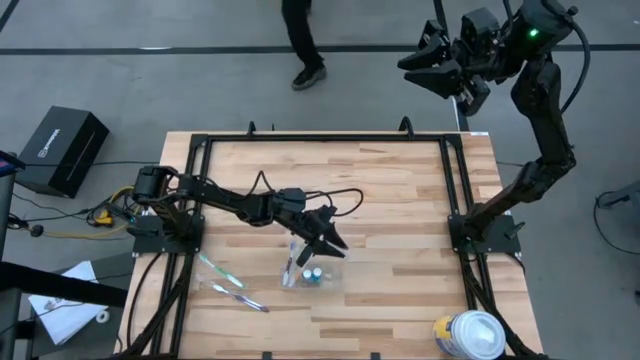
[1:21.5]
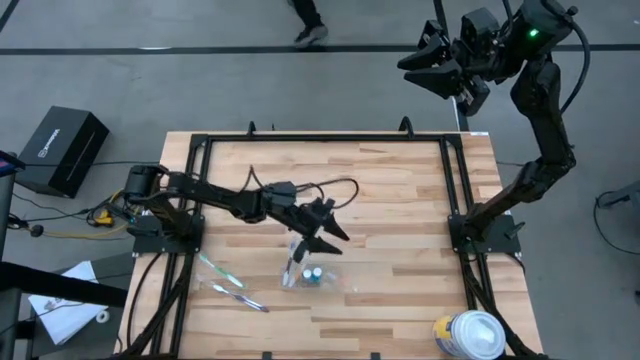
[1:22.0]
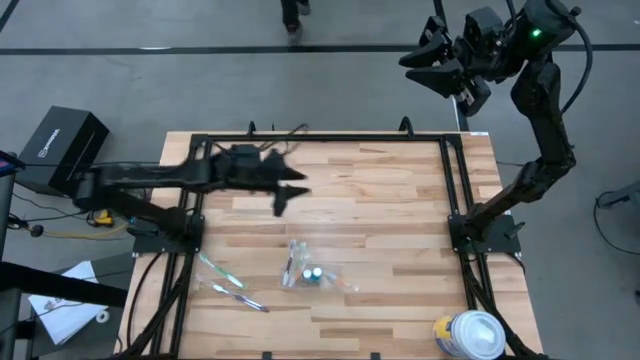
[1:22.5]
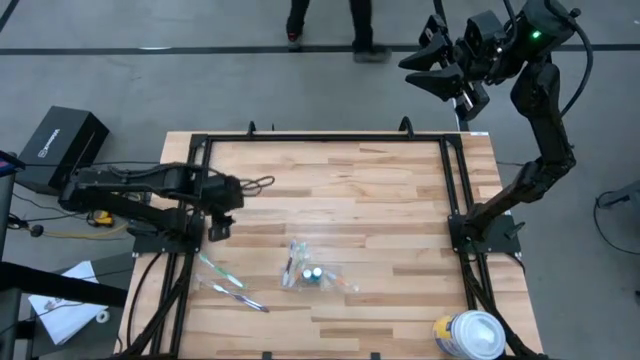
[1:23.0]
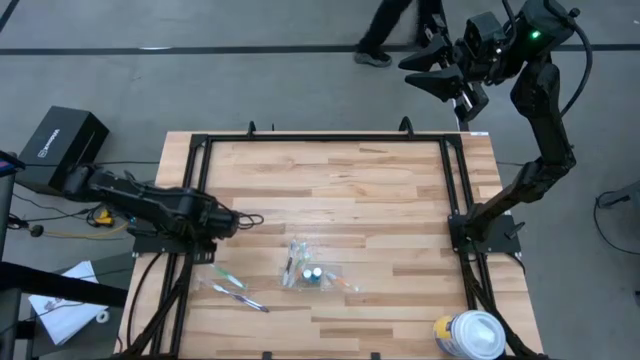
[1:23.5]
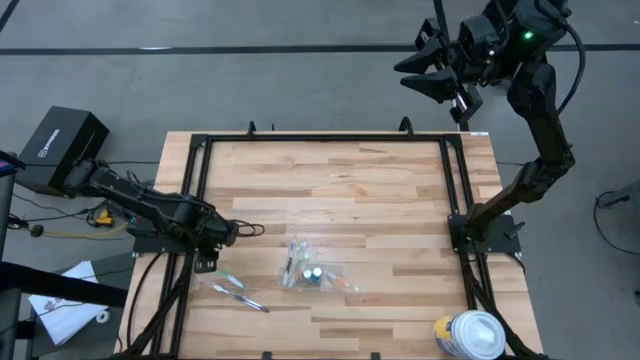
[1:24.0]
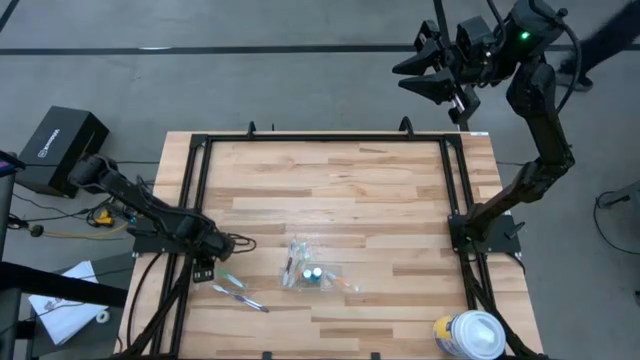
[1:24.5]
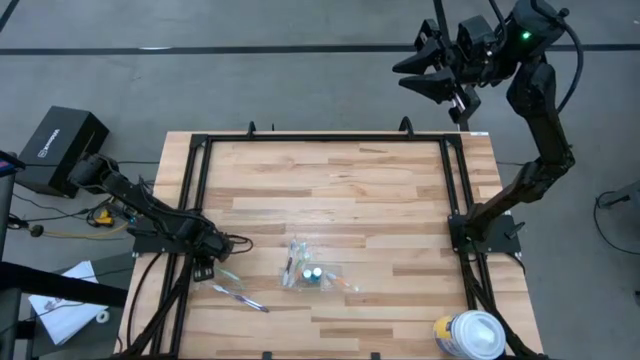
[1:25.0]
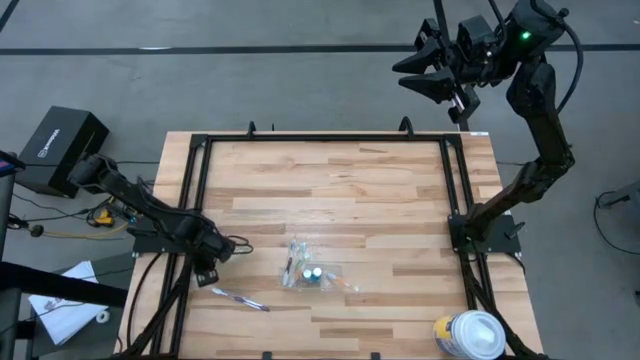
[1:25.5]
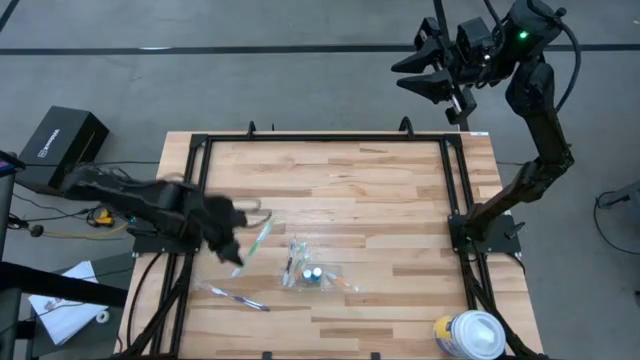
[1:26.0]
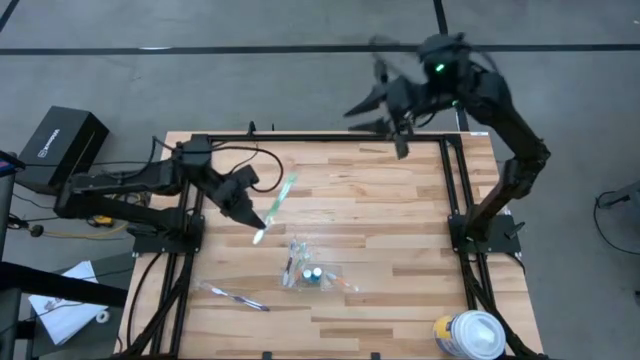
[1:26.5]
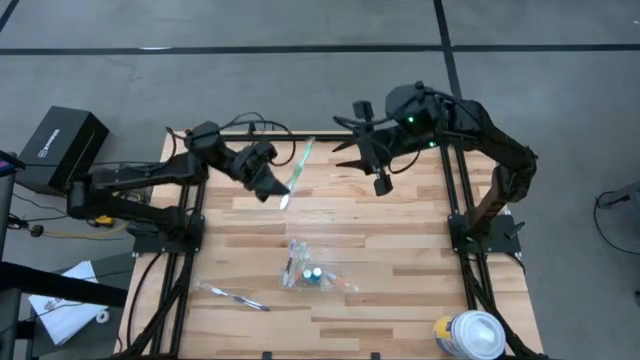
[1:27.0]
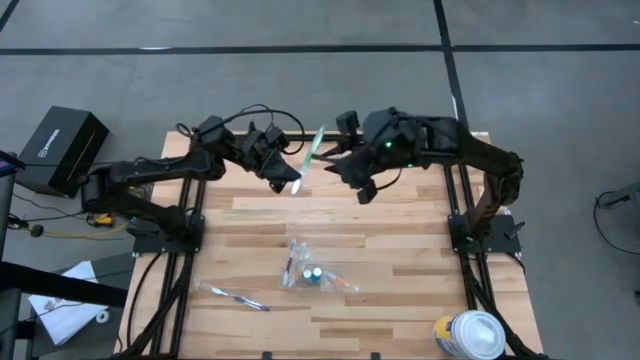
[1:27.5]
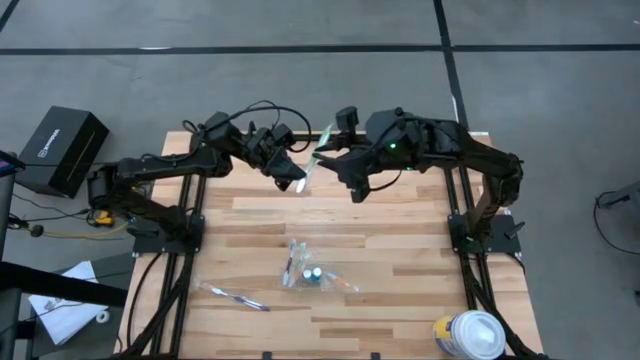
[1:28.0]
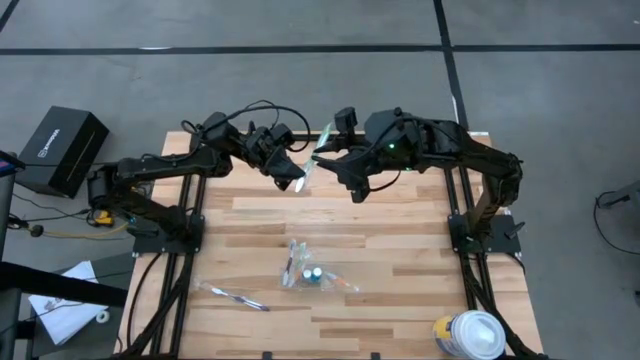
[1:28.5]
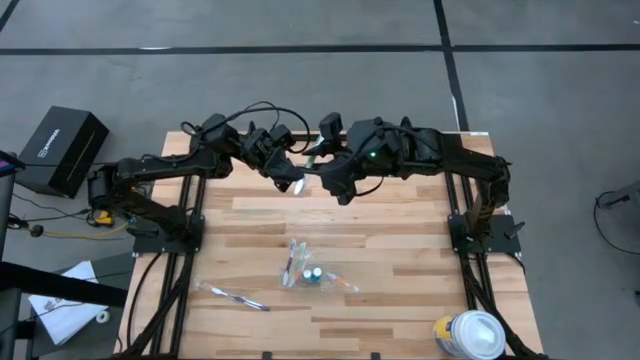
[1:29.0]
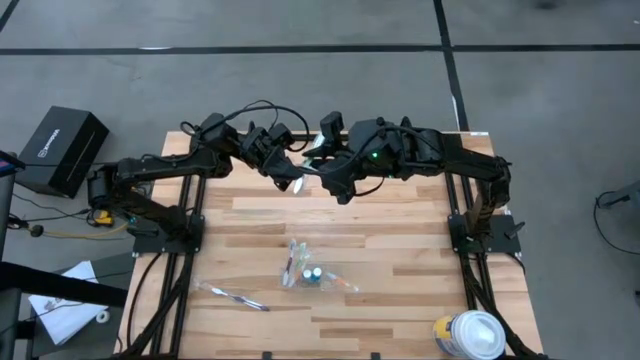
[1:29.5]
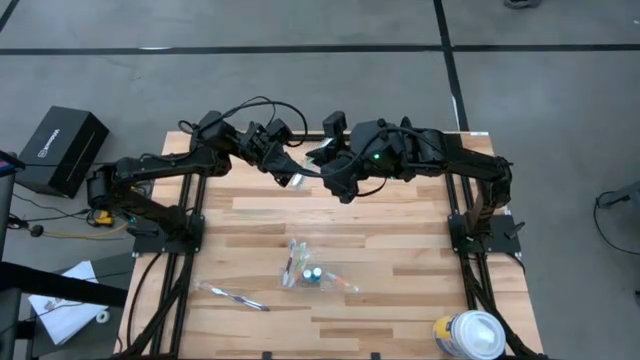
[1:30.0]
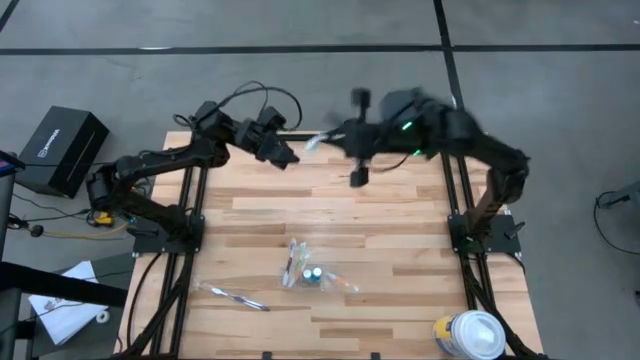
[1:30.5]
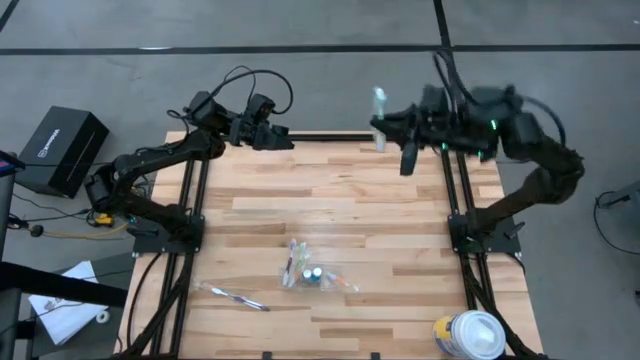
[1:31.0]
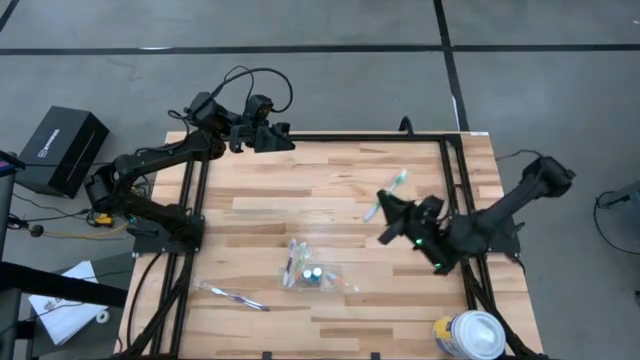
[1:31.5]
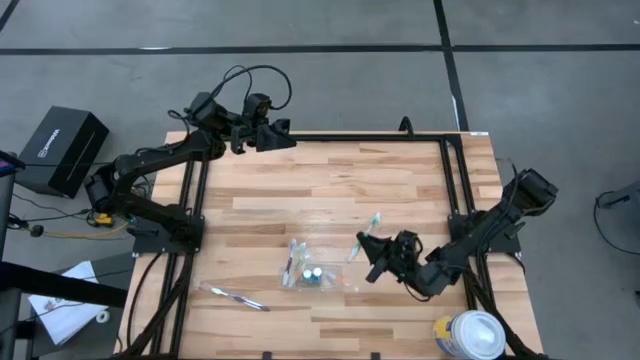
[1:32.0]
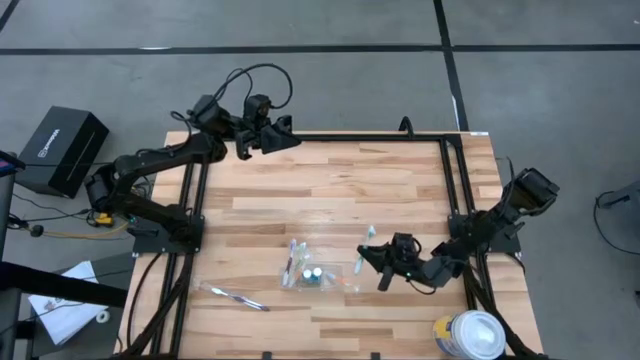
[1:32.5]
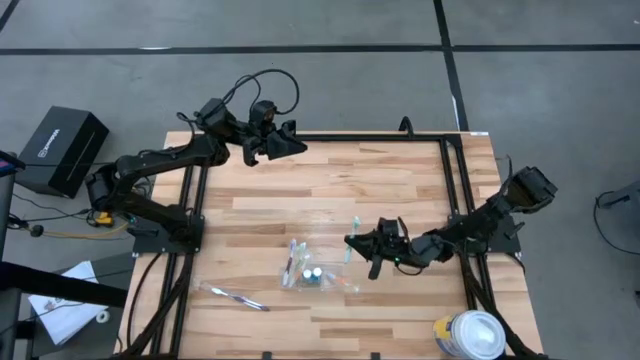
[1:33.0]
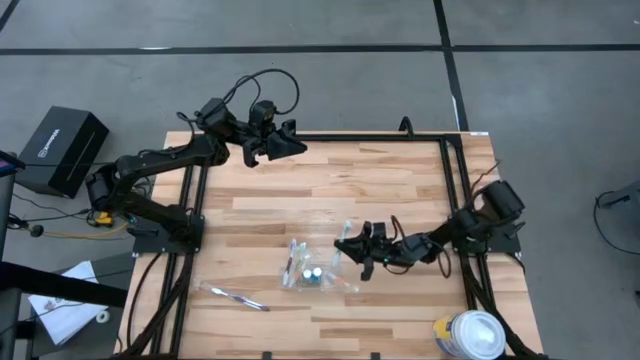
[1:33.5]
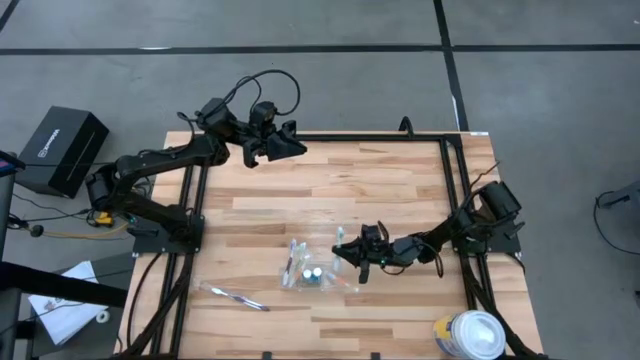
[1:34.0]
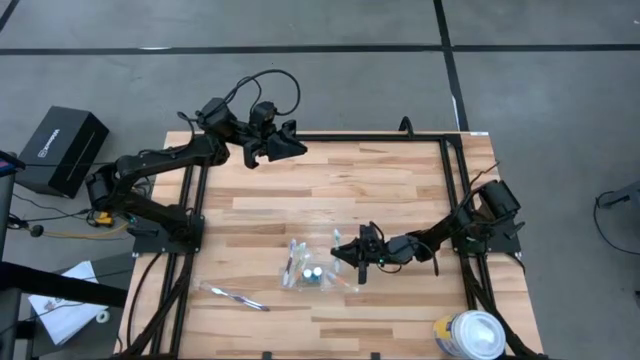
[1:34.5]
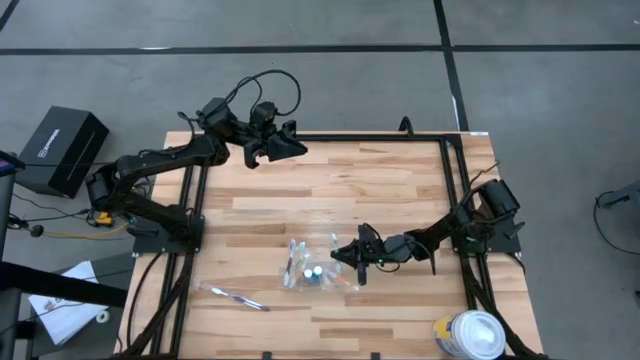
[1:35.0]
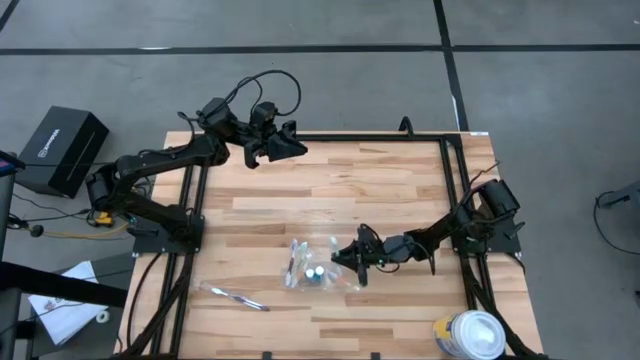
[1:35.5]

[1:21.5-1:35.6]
Task: Pick & Place toothbrushing station
Put the green toothbrush into the transparent organizer

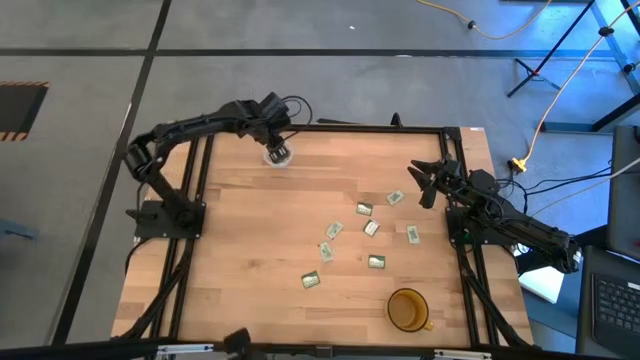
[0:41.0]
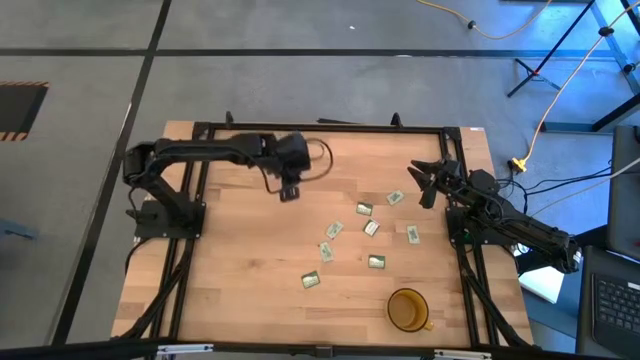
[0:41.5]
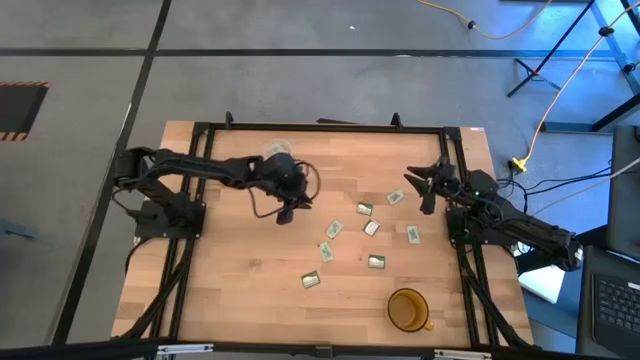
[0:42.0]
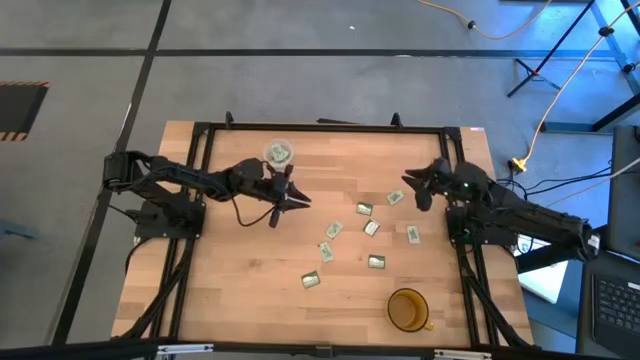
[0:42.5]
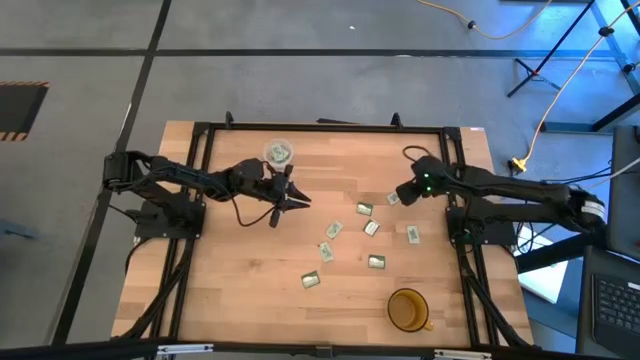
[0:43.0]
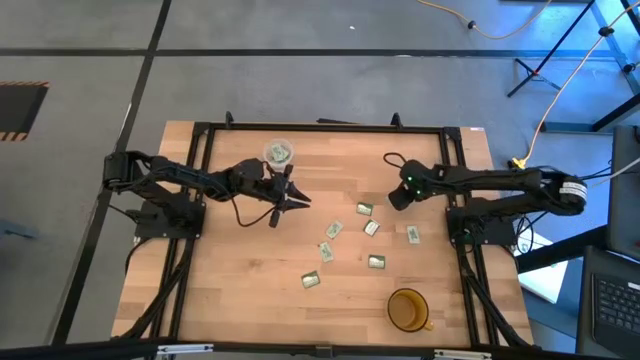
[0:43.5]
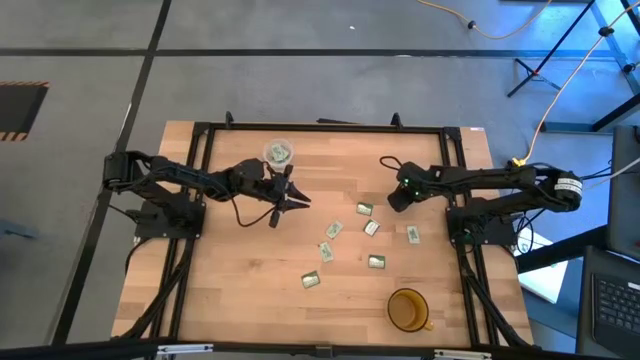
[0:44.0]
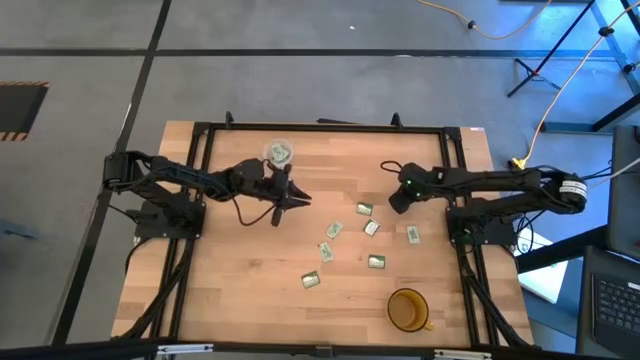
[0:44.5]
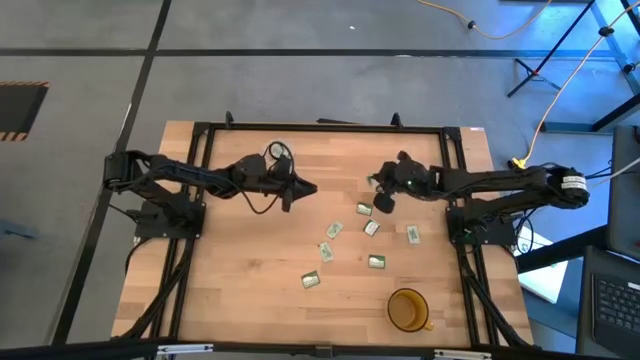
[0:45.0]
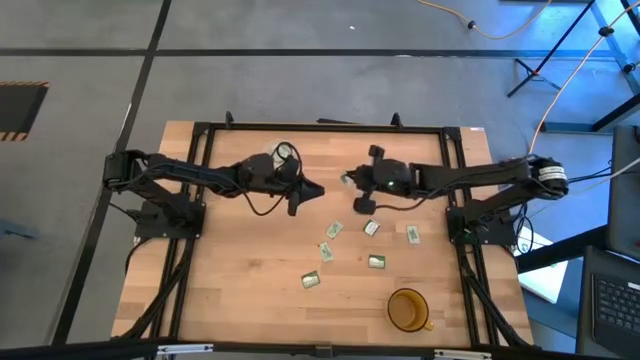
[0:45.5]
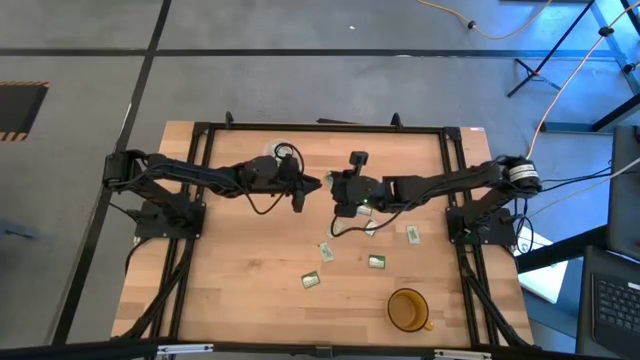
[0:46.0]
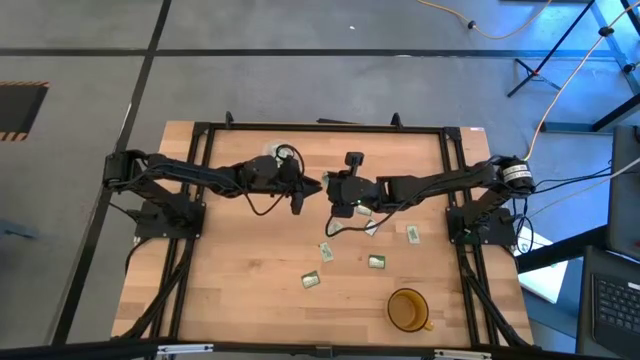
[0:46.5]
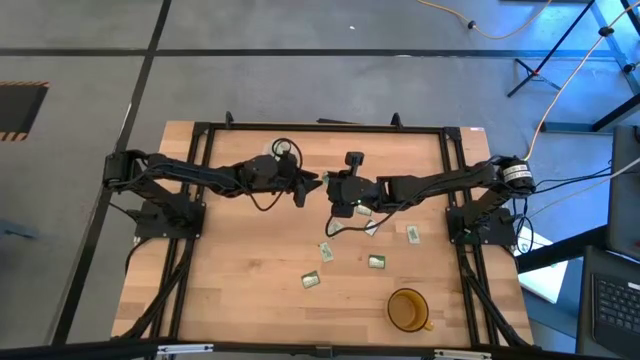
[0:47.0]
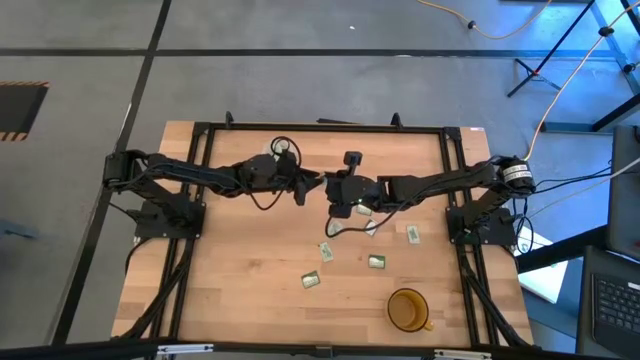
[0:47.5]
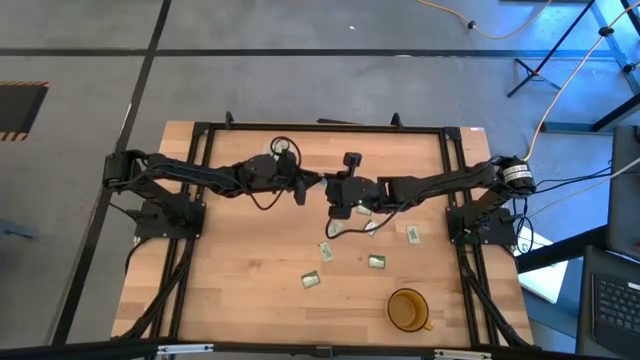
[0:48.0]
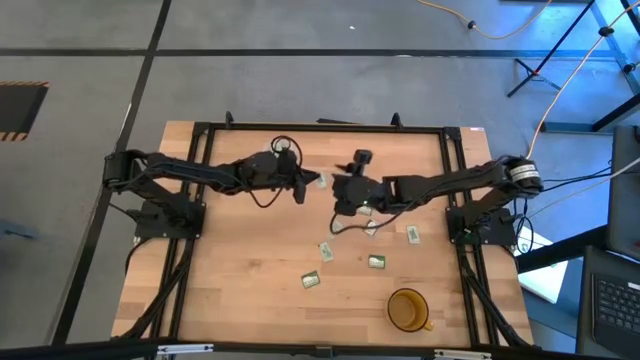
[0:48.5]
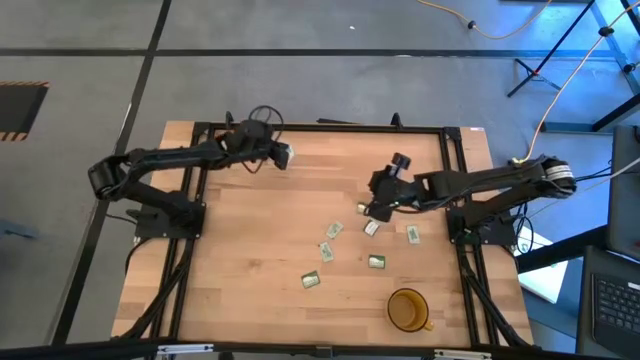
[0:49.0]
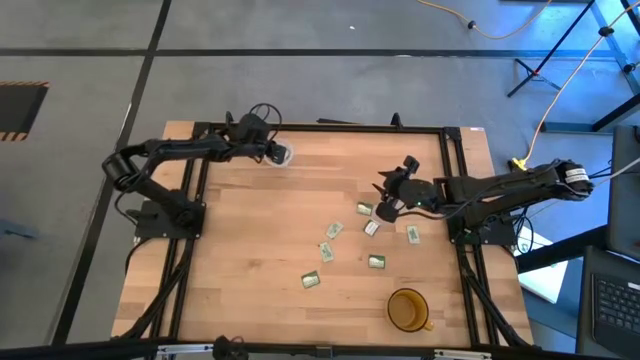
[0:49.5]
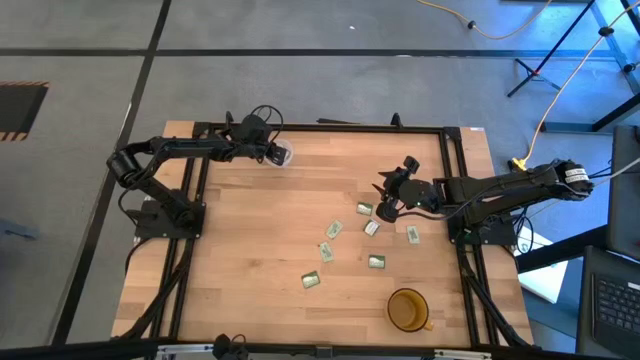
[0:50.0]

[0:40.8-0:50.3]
Task: Pick and place Stevia / Truvia into bins
Put the stevia packet into the transparent container
